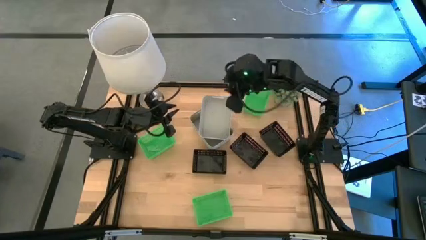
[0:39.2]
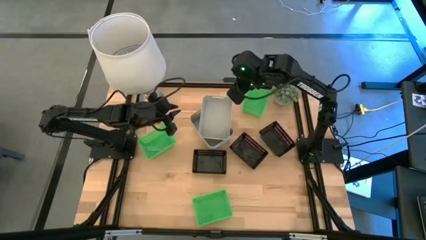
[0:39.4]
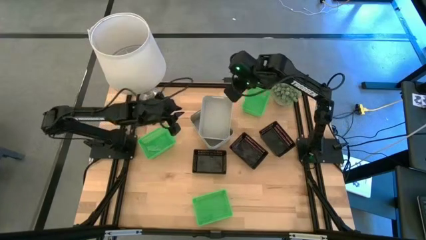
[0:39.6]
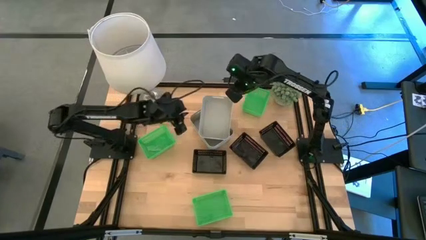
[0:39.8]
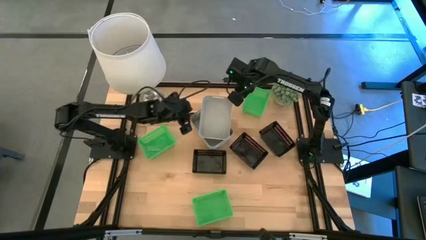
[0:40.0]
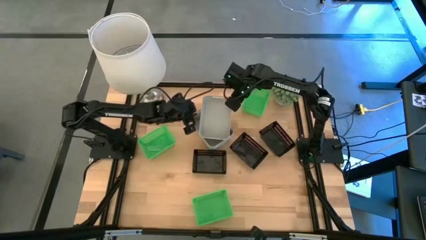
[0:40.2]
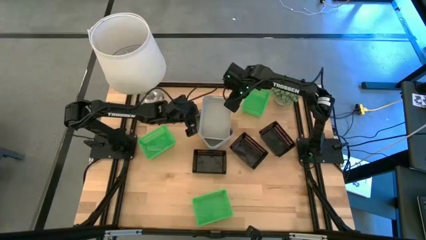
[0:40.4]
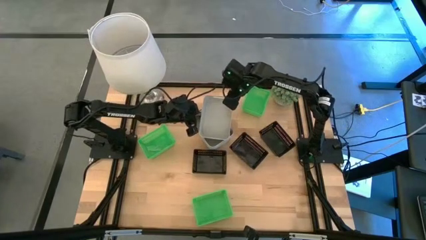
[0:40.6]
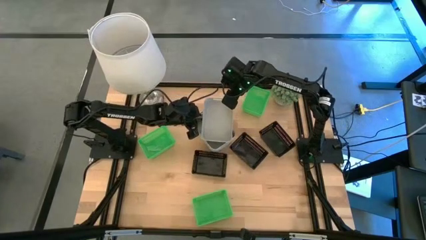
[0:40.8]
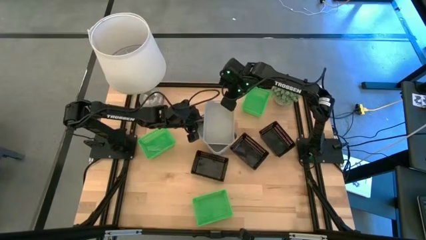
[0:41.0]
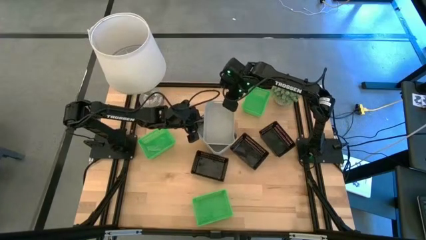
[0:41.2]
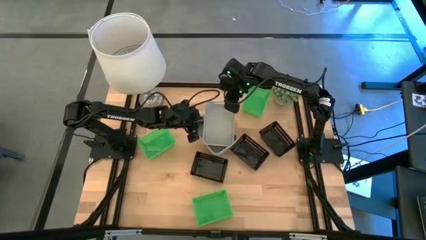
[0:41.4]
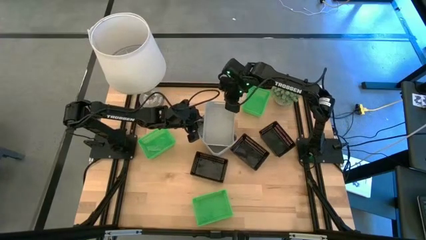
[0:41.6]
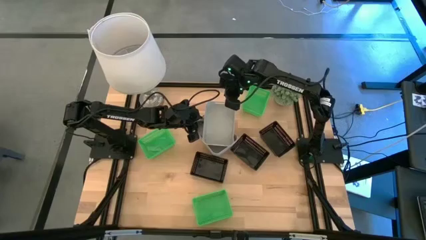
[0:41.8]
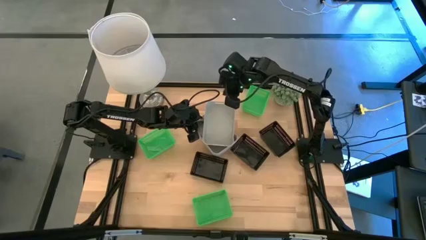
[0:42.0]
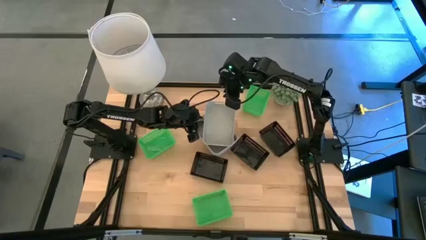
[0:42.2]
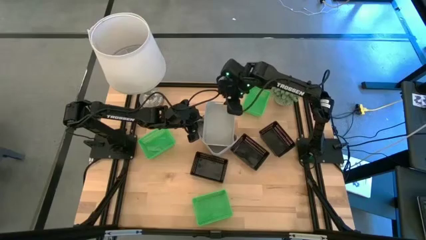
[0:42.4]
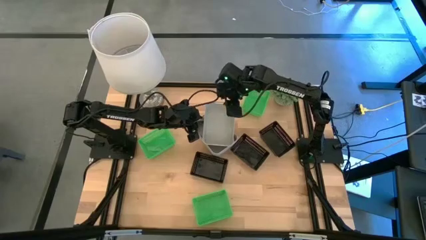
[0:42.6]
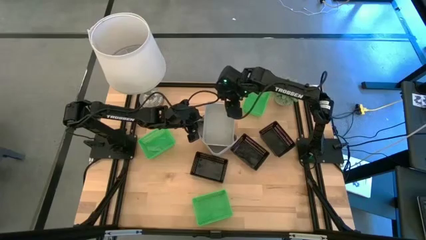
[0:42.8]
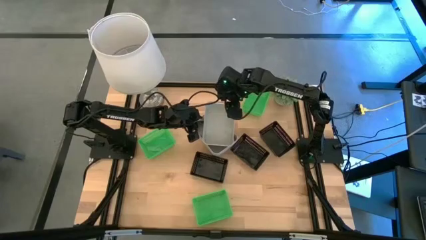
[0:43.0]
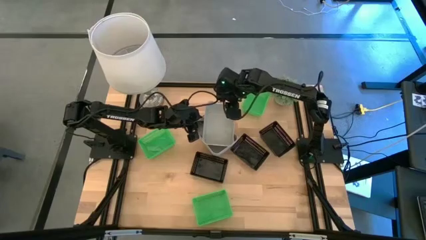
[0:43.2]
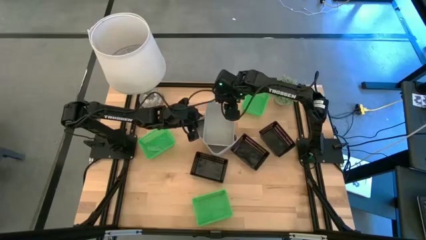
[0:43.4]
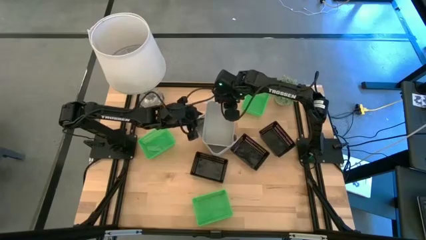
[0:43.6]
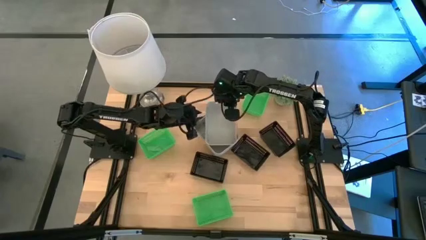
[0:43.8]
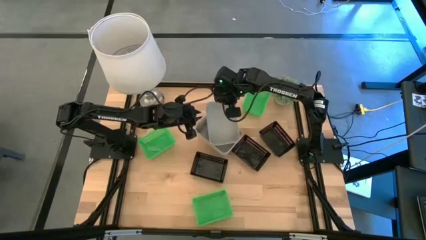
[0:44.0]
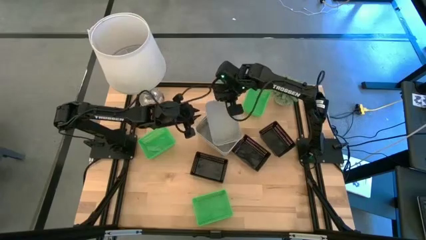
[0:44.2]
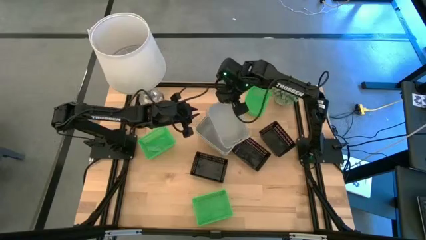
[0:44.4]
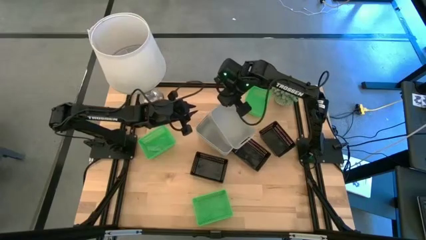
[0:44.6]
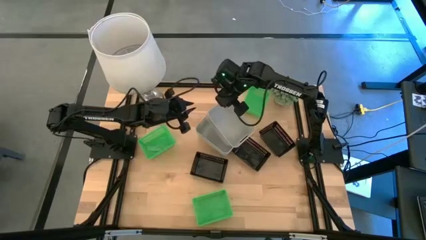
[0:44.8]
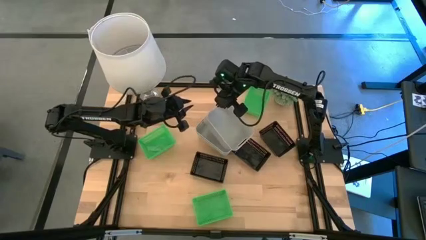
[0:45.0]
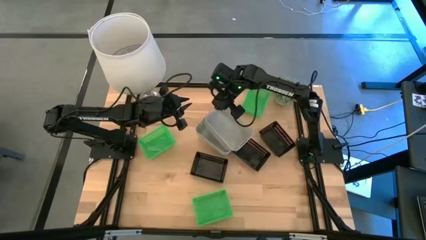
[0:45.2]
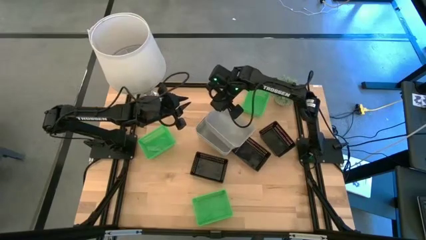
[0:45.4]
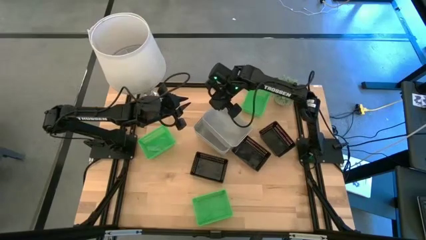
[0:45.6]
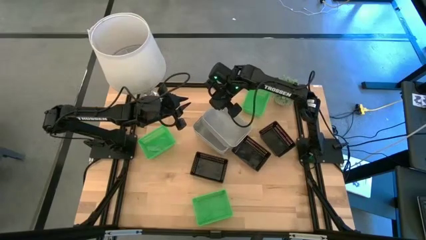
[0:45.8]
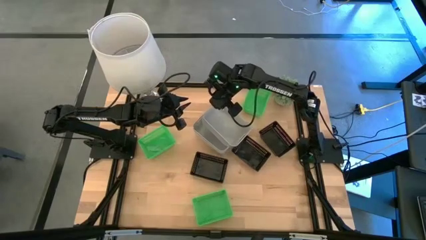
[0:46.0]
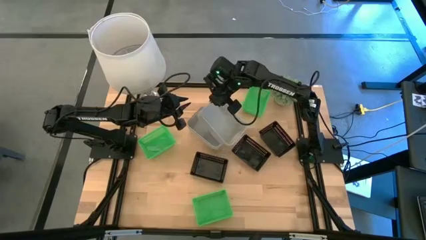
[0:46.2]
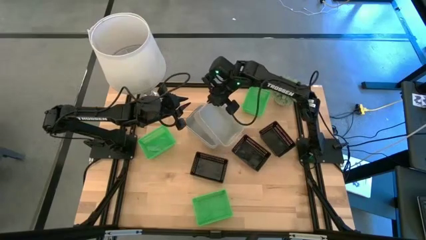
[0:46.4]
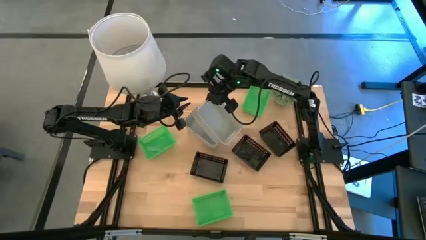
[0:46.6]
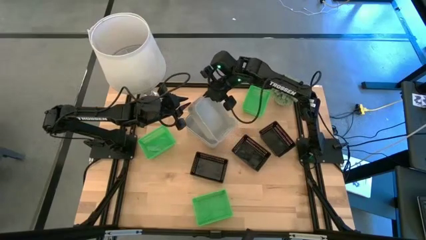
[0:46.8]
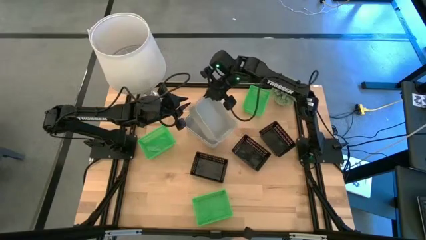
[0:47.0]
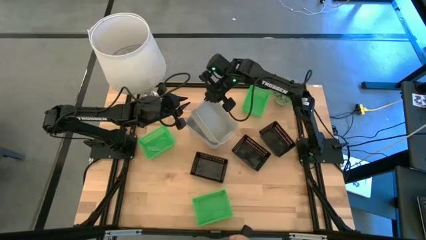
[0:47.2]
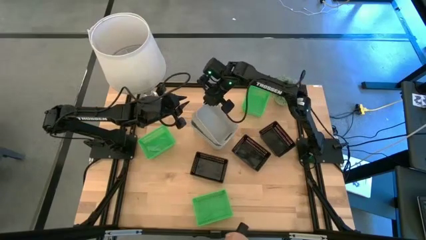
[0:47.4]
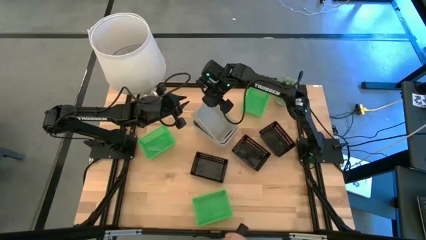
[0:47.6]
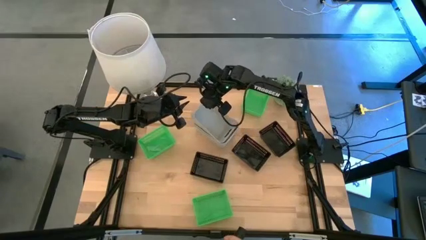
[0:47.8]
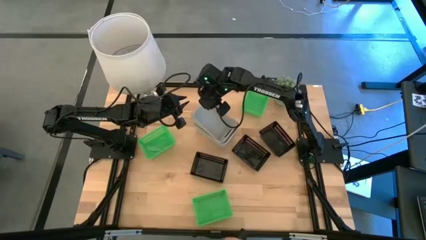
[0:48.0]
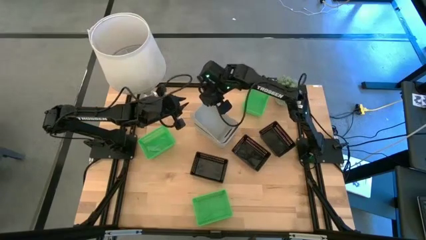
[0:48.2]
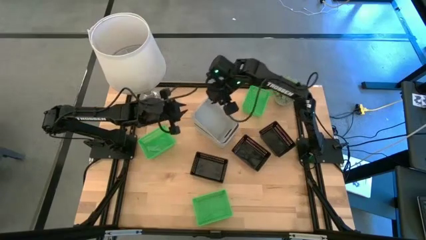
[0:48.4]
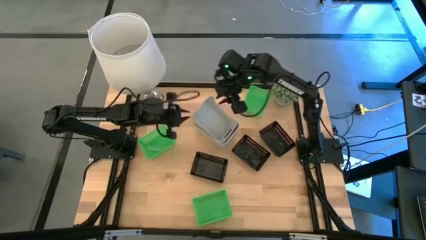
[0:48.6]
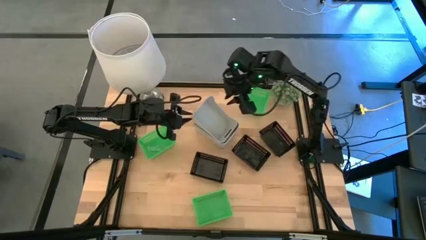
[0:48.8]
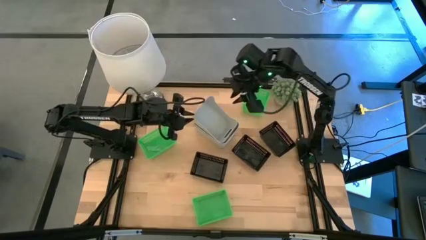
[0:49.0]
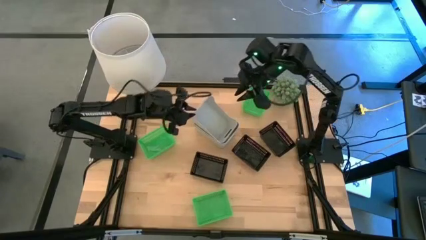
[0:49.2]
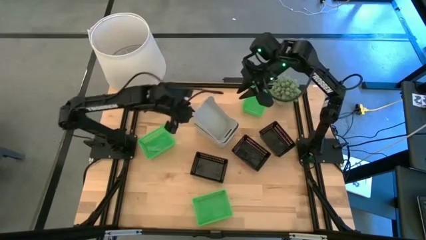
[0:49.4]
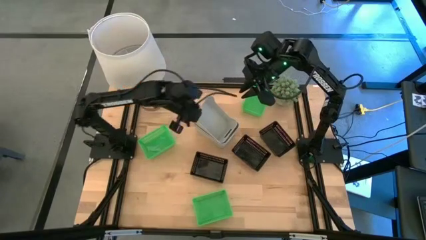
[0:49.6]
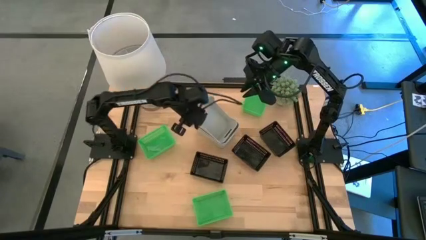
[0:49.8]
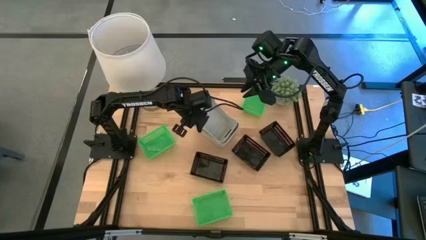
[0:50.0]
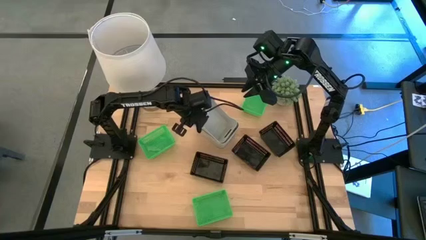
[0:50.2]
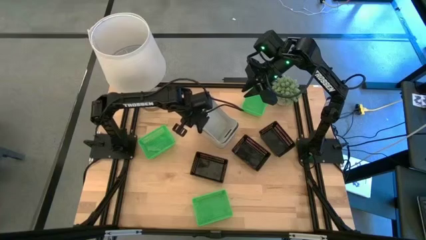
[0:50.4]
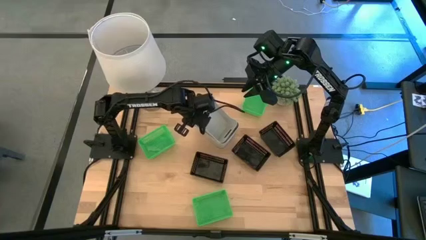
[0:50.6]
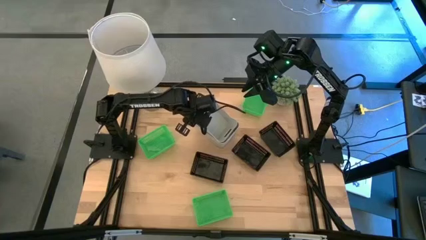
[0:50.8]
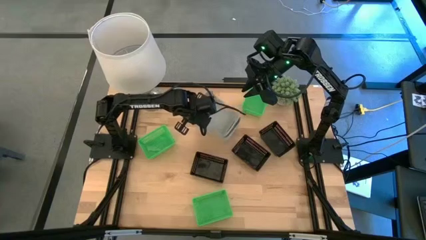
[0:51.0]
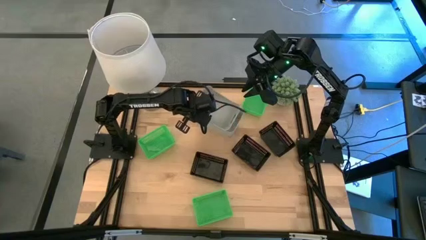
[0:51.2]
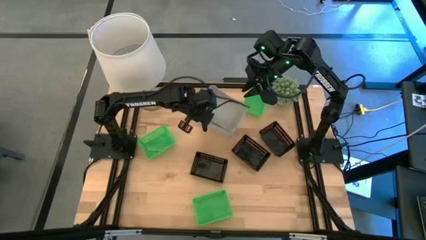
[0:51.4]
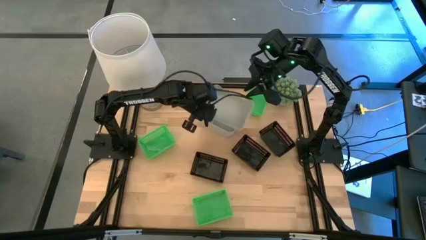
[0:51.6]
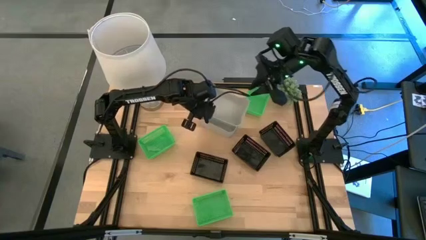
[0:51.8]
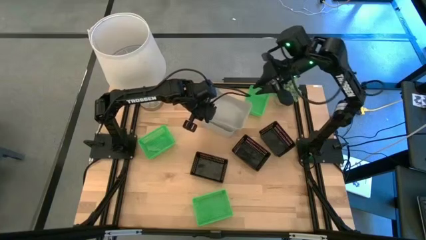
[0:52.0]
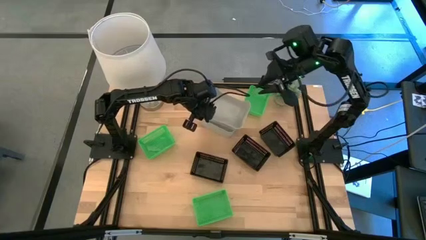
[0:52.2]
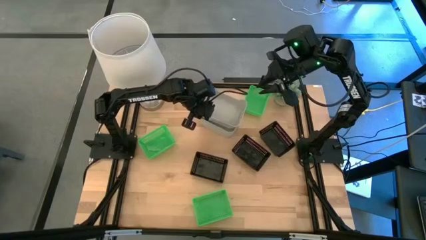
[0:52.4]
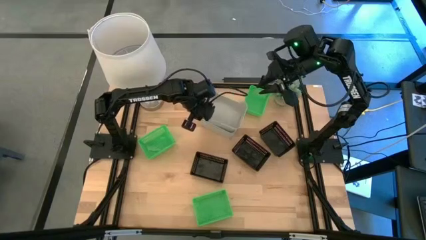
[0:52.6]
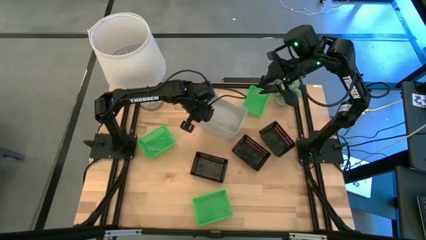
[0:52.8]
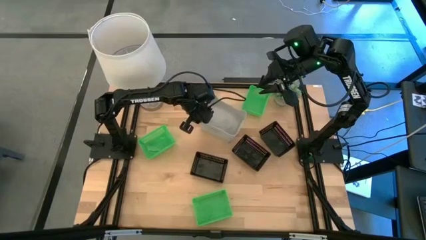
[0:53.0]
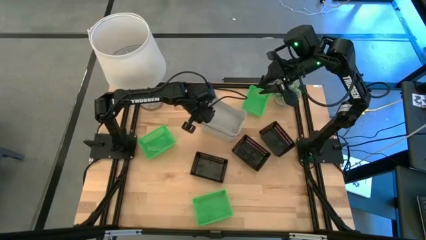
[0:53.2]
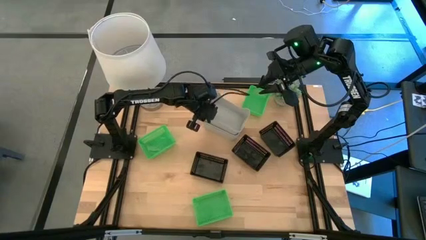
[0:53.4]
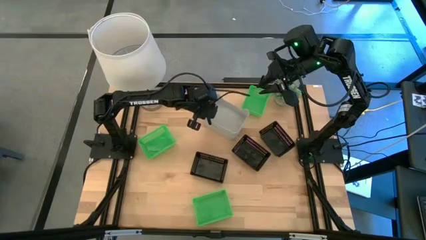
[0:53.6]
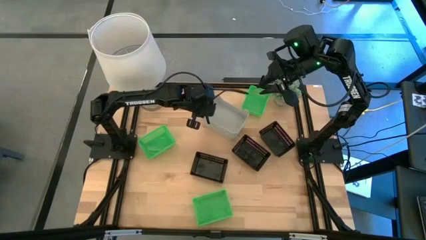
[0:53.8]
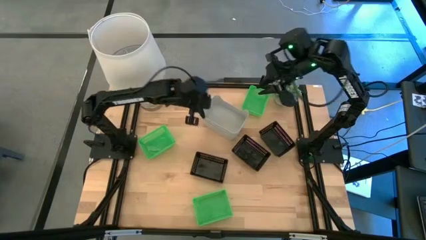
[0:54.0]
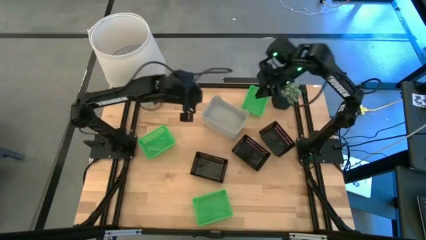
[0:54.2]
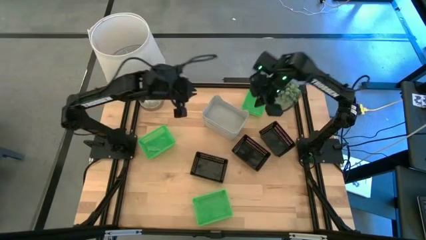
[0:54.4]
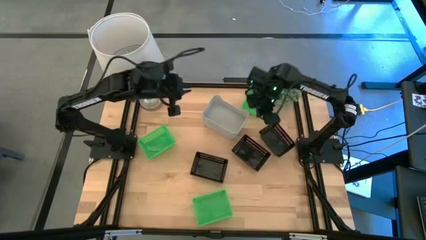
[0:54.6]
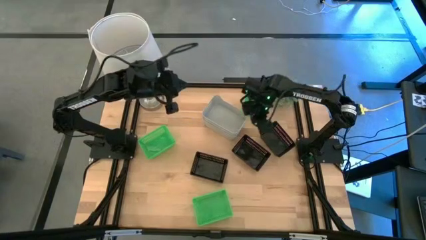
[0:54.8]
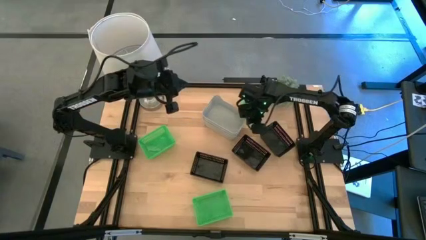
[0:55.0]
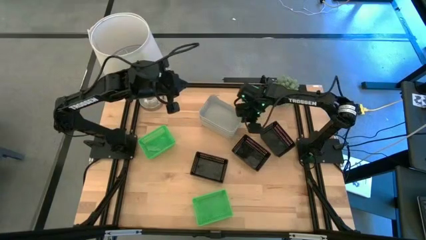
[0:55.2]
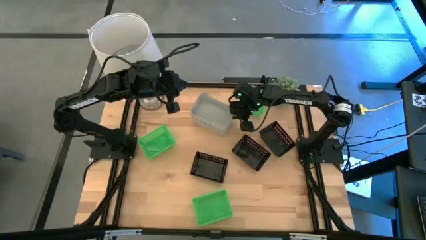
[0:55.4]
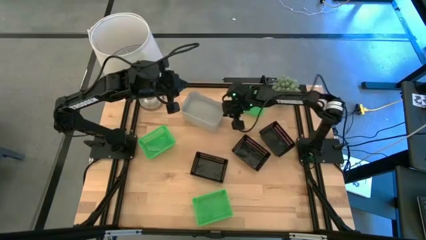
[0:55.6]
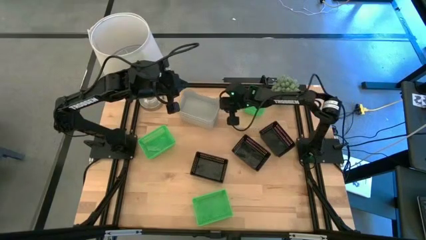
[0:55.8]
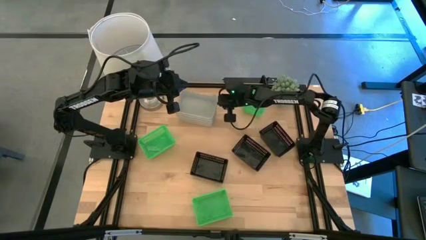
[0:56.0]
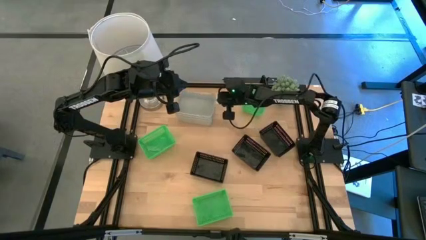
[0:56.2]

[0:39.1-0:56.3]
Stack the bottom gray bin on top of the top gray bin
